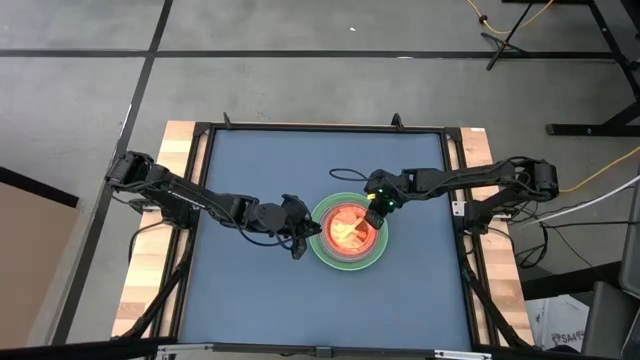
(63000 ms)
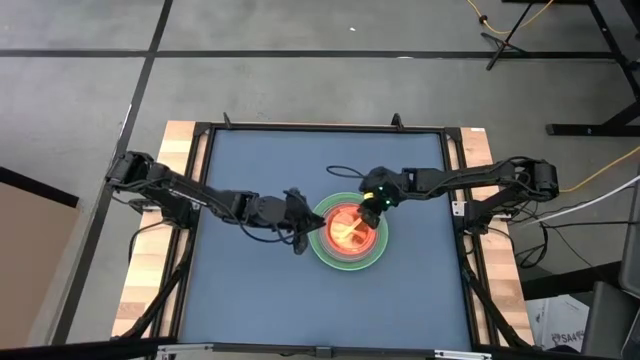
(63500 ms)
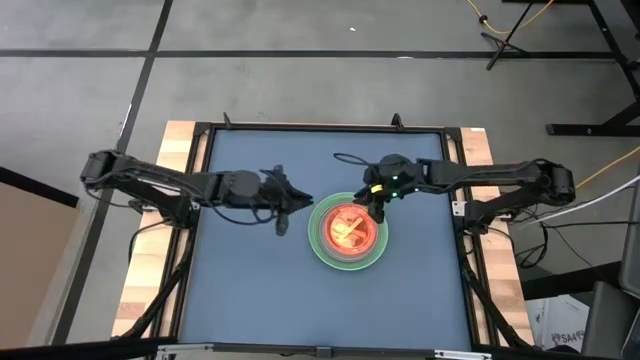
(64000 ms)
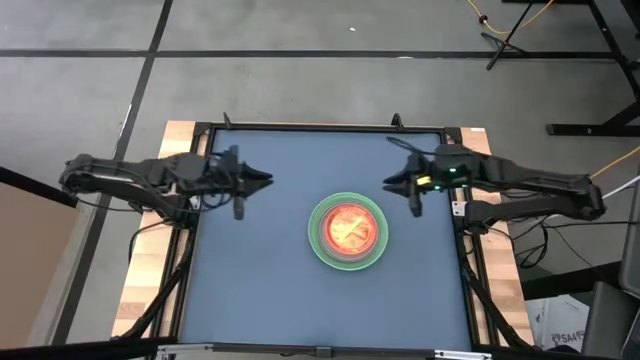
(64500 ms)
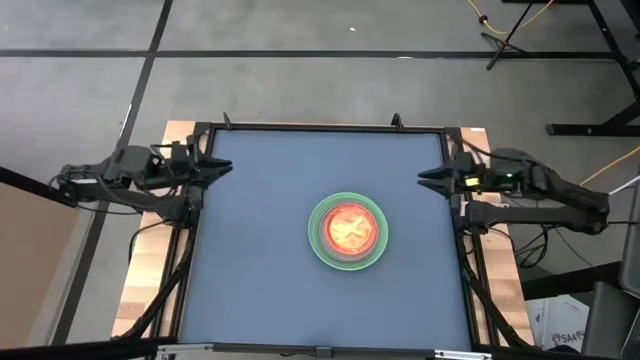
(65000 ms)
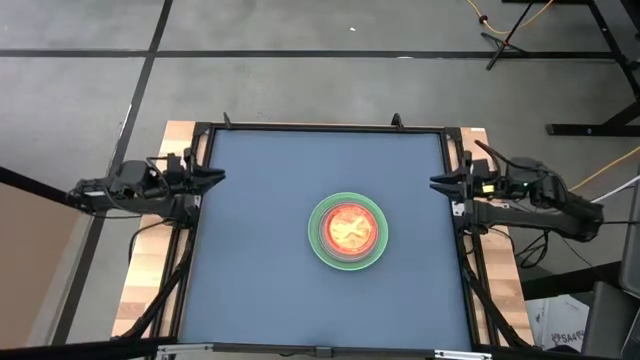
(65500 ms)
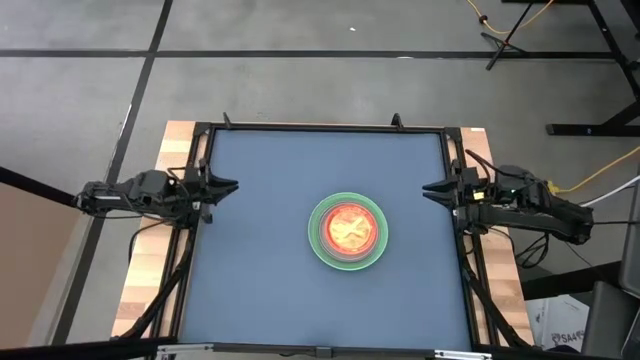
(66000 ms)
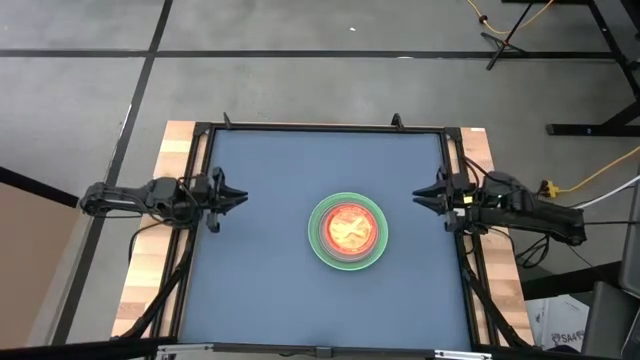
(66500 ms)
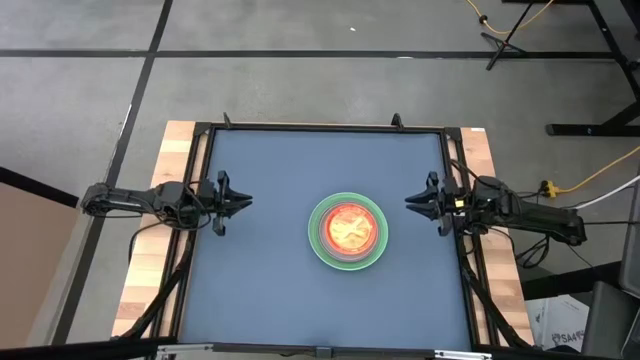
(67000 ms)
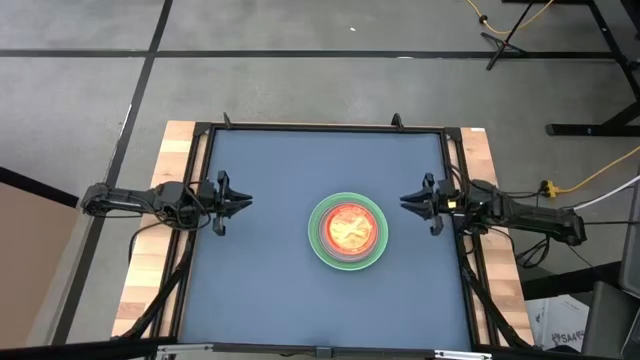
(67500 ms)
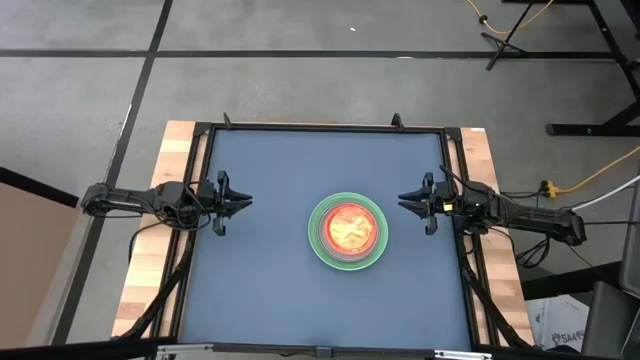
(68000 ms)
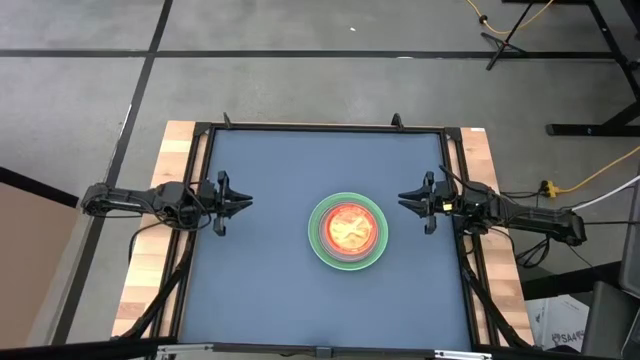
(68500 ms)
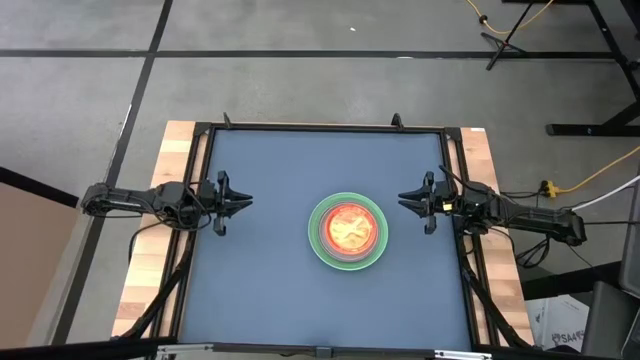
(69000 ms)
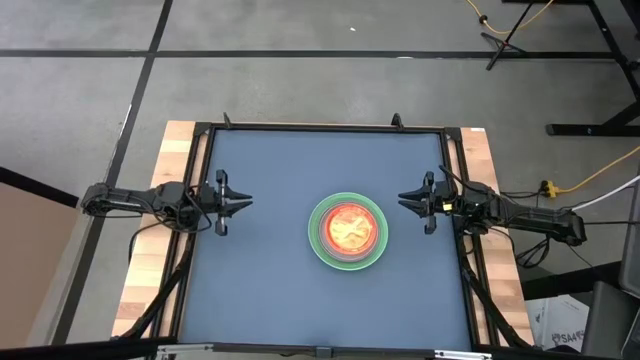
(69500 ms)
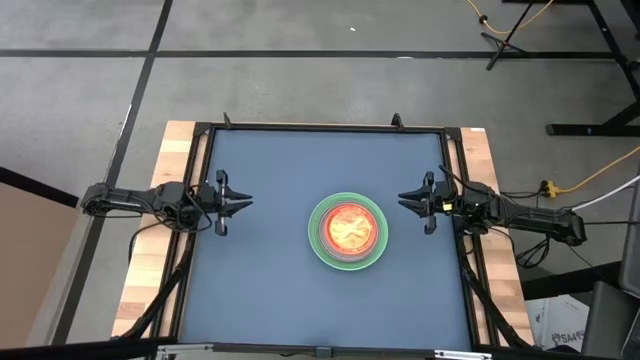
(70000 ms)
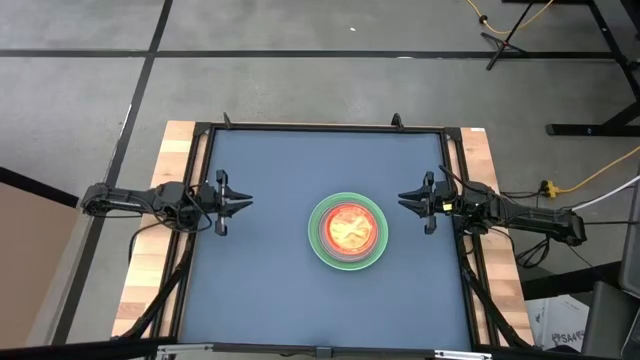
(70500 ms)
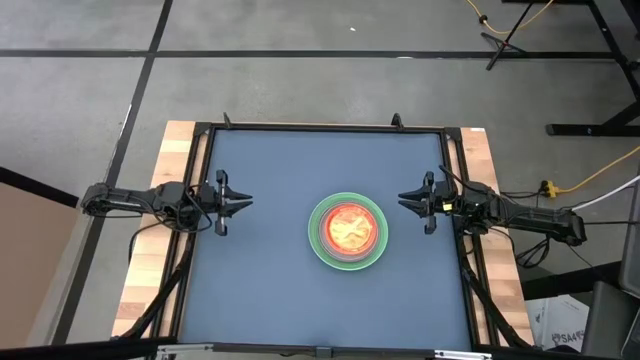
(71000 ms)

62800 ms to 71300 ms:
Task: Stack plastic plates
Return to Home Position

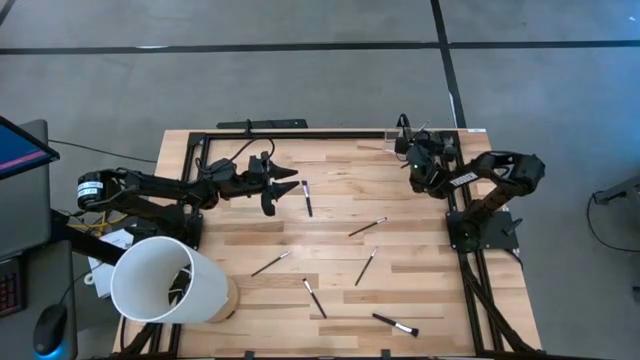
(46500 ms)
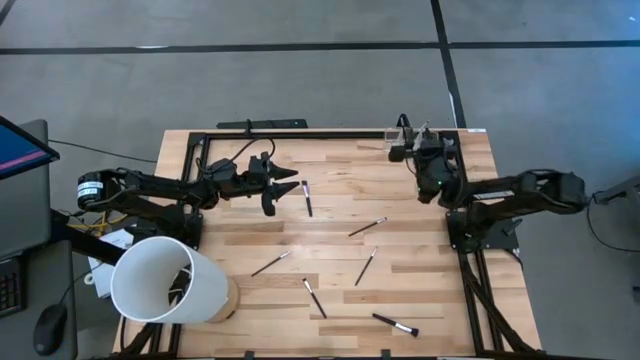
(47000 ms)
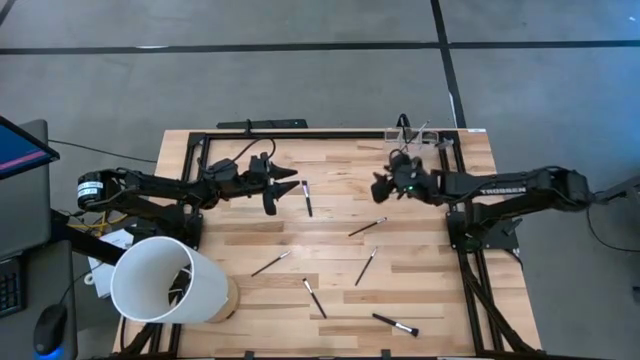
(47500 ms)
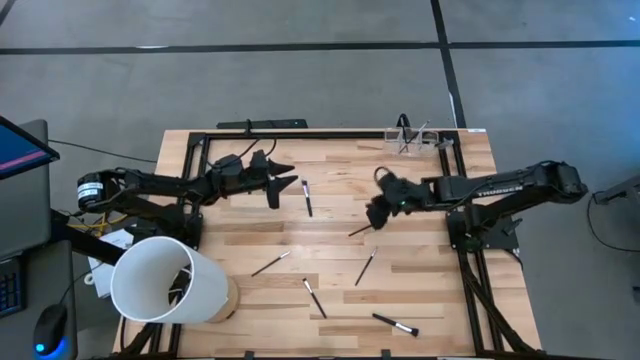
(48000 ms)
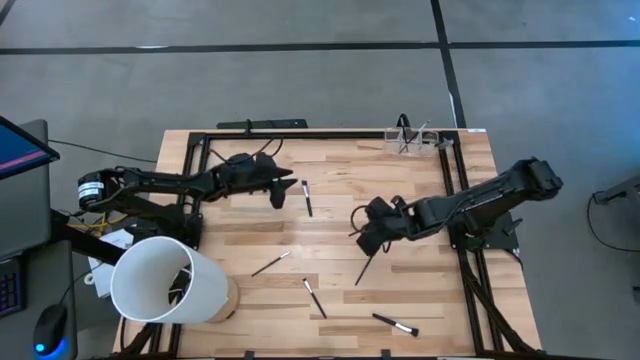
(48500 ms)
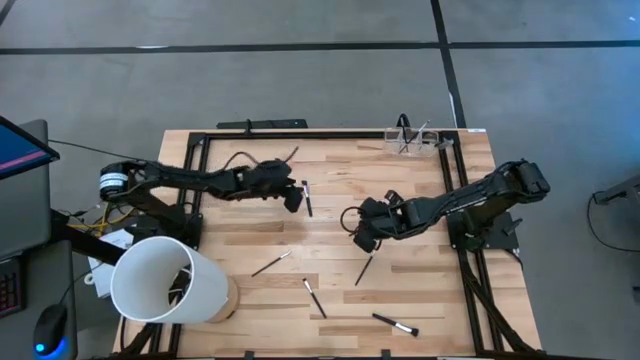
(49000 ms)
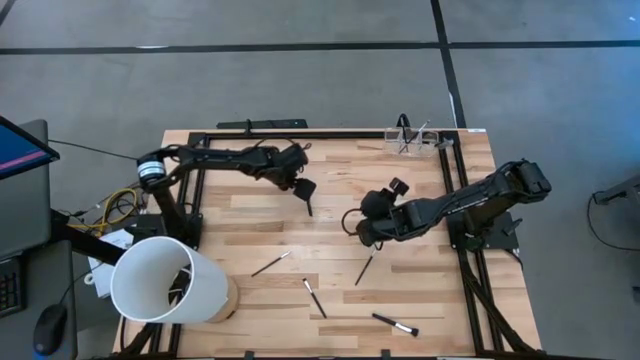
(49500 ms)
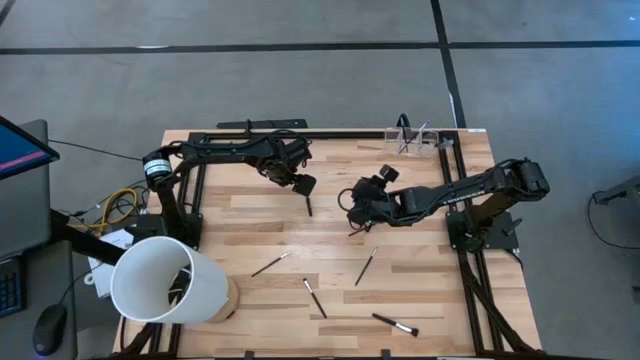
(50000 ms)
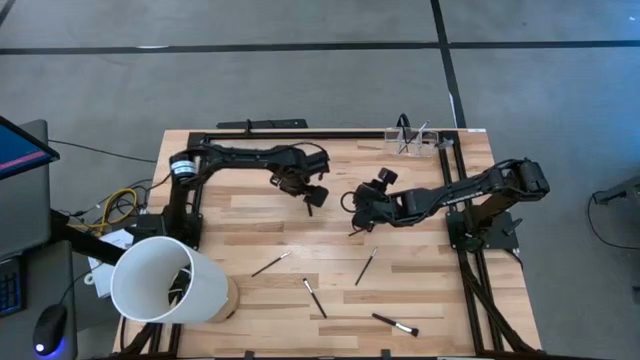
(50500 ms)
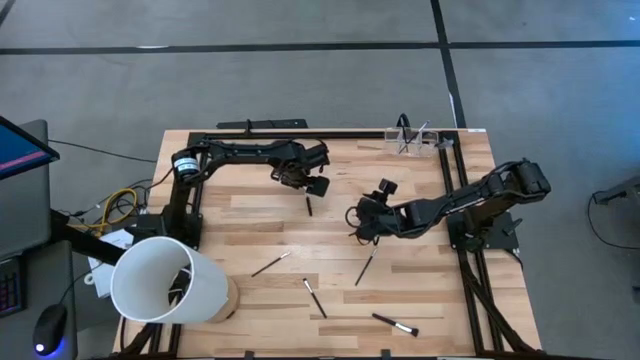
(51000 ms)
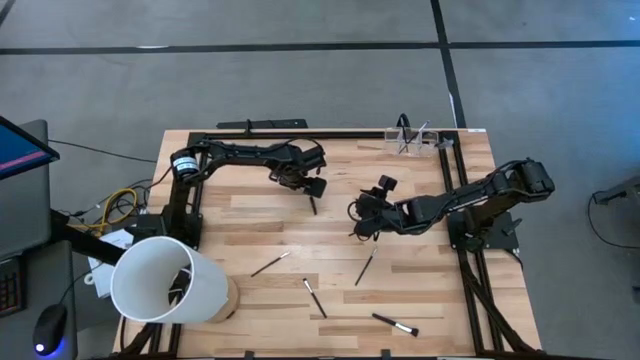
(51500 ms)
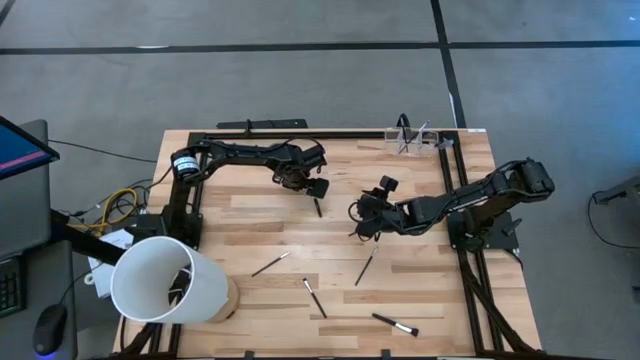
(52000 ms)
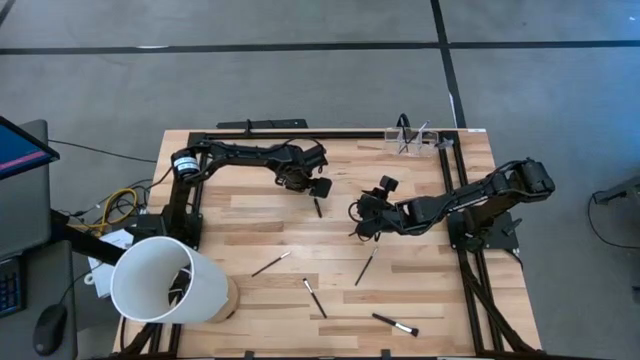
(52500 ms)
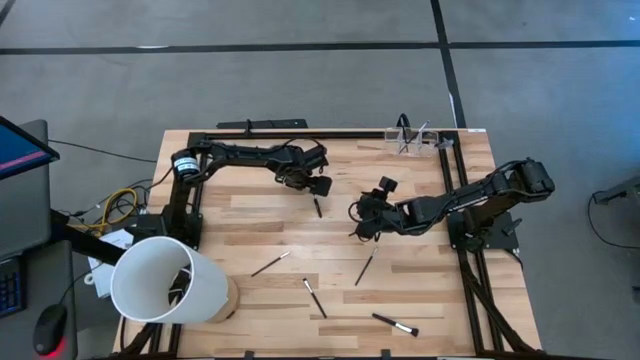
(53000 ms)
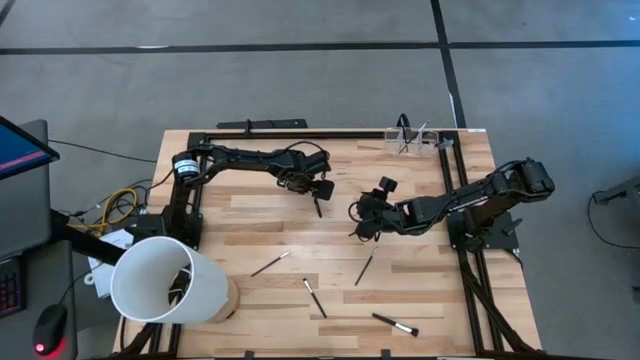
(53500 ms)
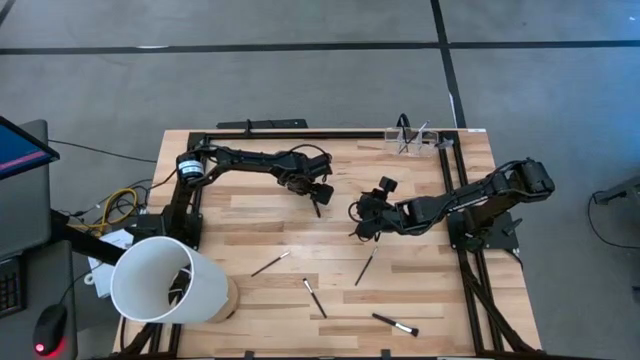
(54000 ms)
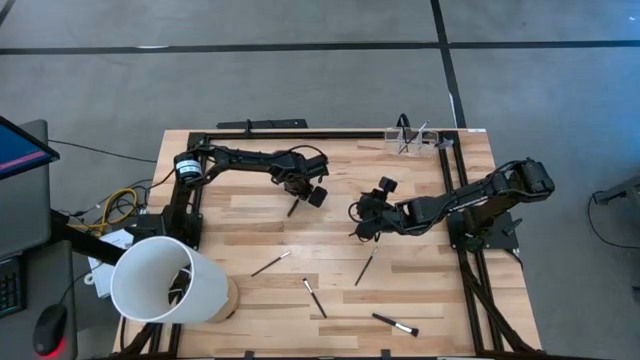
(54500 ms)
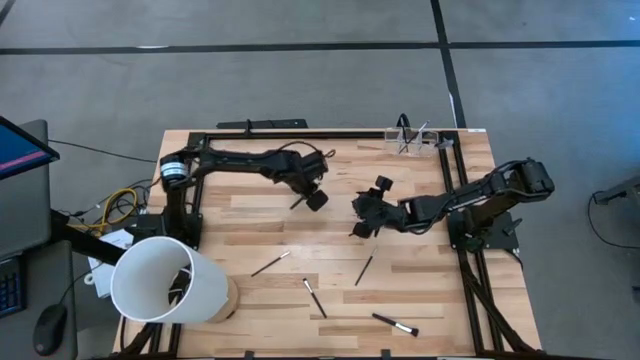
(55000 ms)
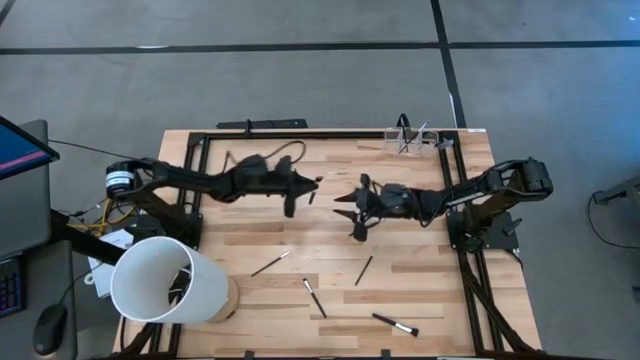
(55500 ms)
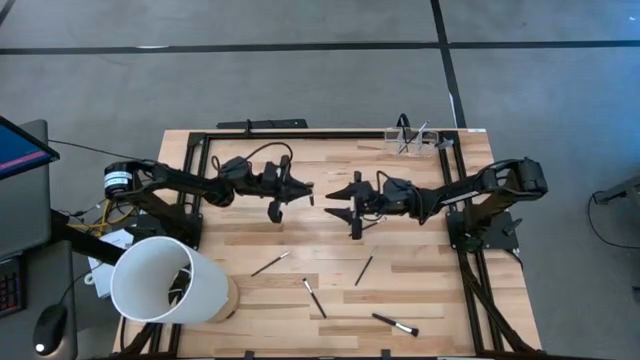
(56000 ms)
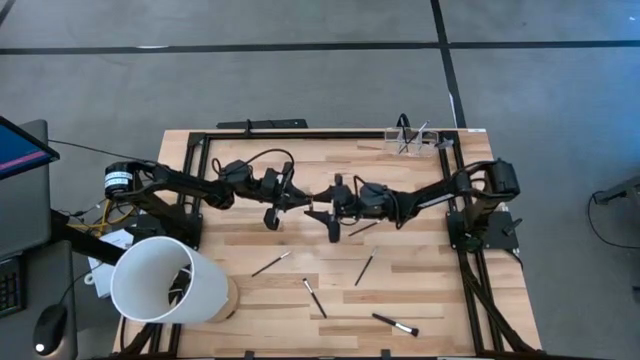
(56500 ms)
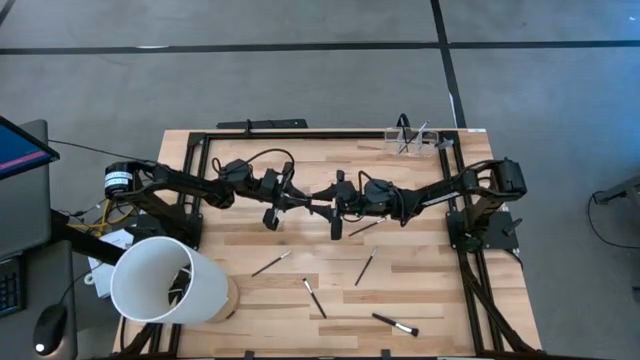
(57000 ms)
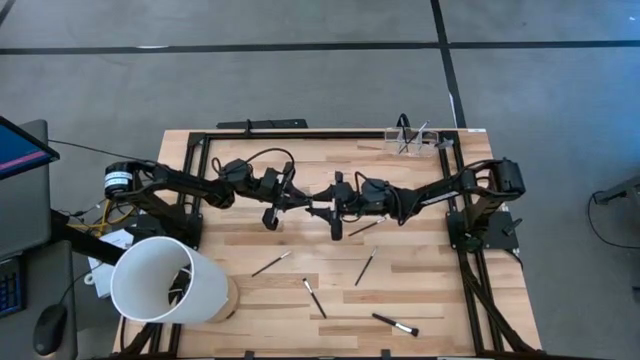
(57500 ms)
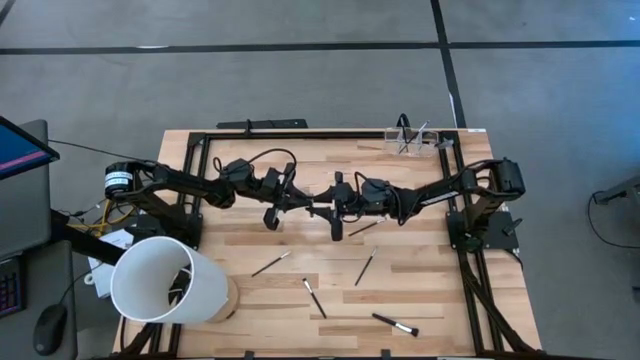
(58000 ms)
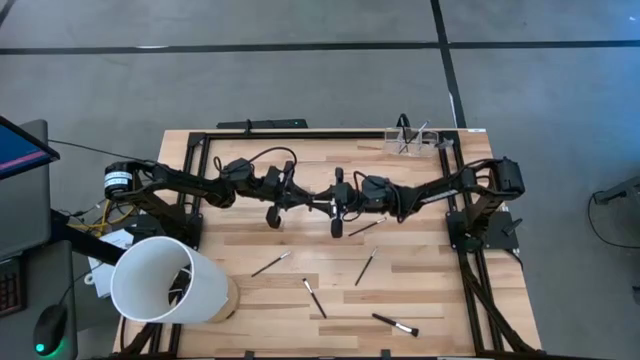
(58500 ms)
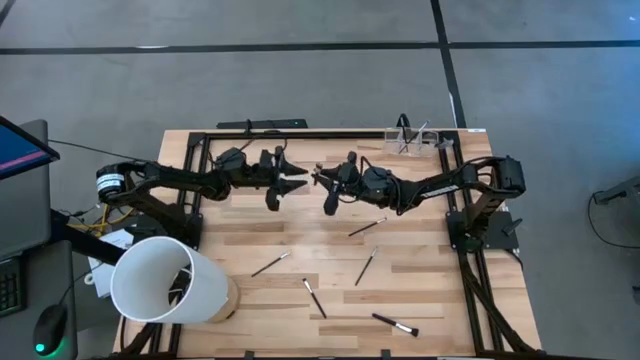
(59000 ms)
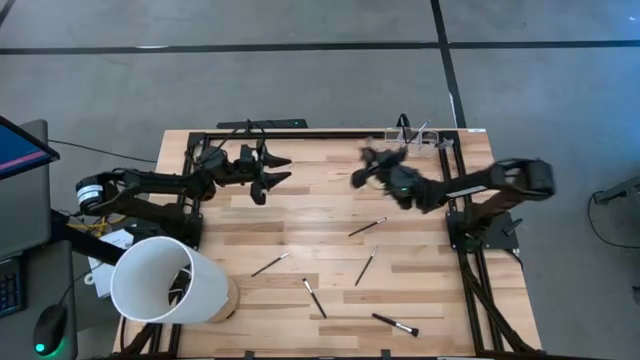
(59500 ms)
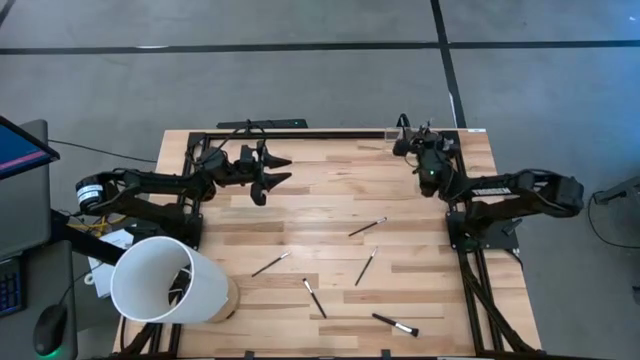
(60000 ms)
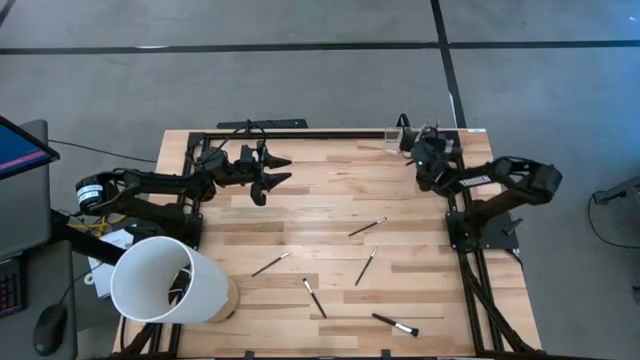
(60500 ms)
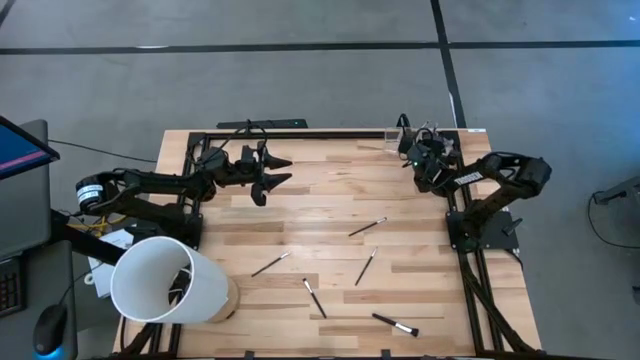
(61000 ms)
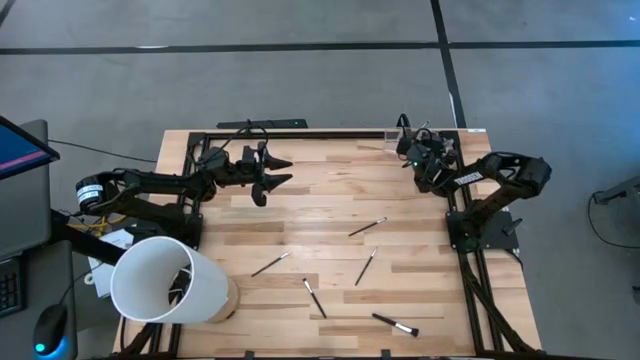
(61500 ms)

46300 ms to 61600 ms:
Task: Put items in baskets/containers
Put the blush brush into the right section of the transparent organizer
